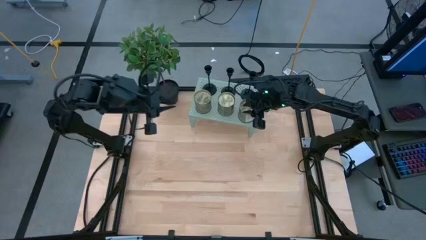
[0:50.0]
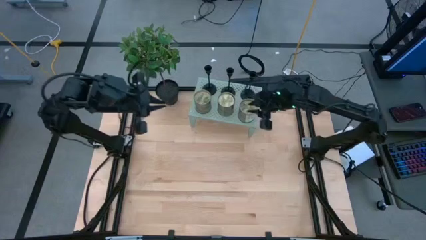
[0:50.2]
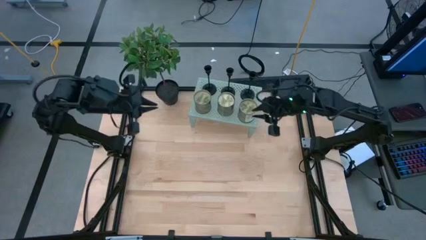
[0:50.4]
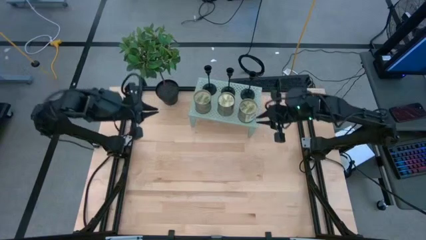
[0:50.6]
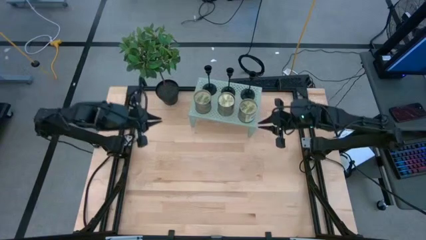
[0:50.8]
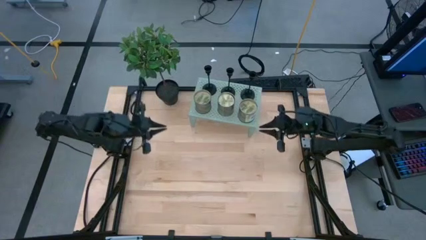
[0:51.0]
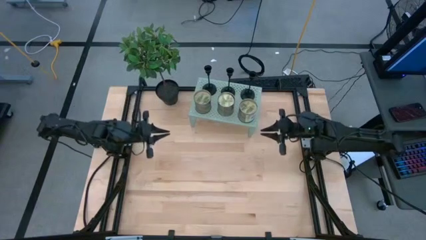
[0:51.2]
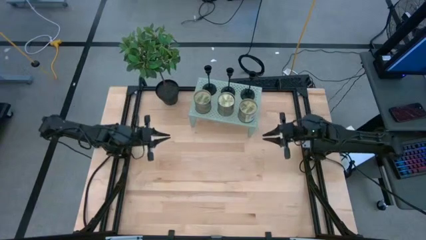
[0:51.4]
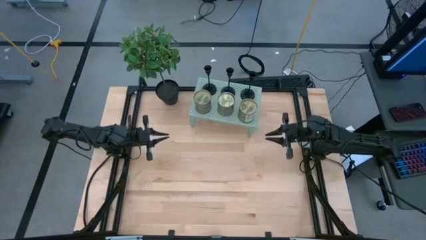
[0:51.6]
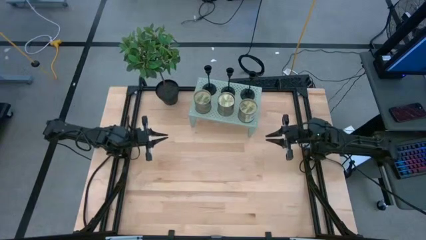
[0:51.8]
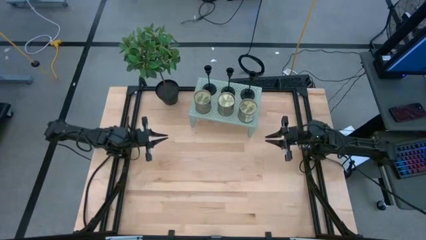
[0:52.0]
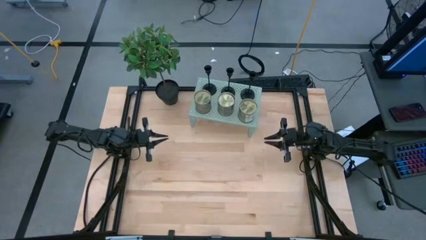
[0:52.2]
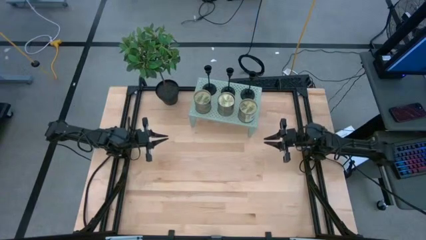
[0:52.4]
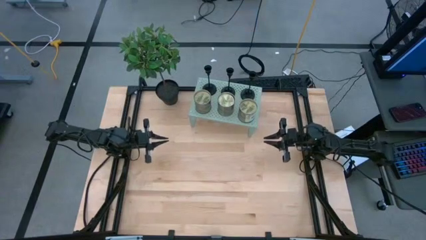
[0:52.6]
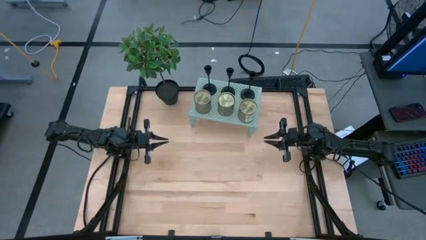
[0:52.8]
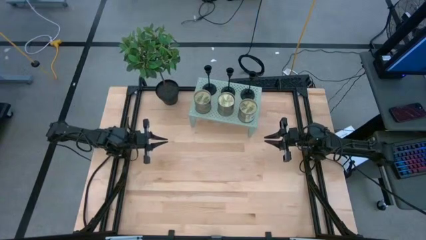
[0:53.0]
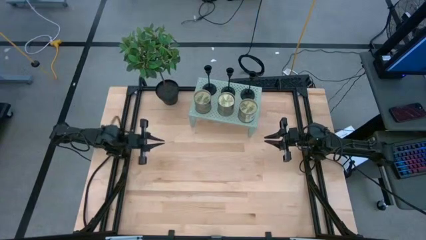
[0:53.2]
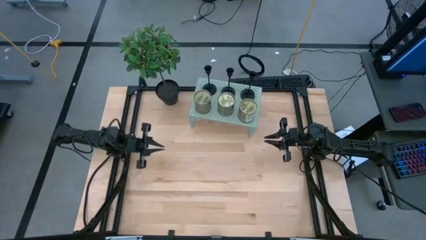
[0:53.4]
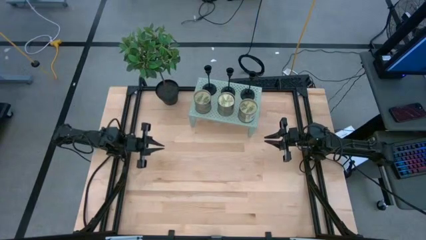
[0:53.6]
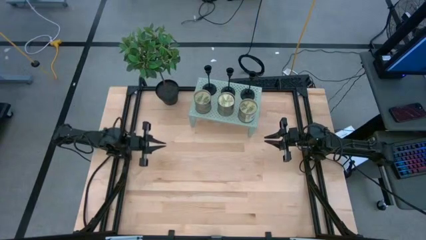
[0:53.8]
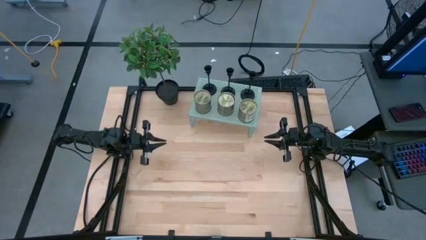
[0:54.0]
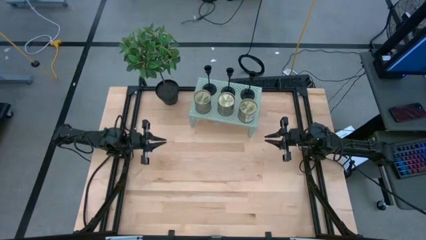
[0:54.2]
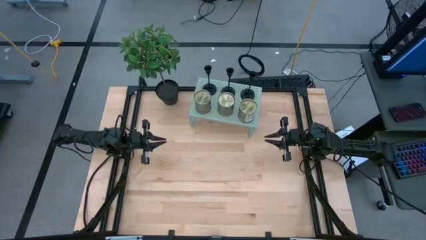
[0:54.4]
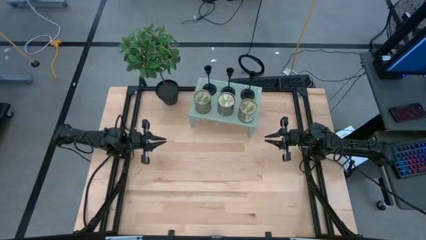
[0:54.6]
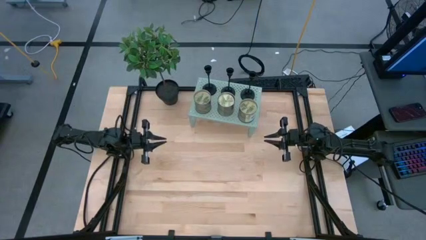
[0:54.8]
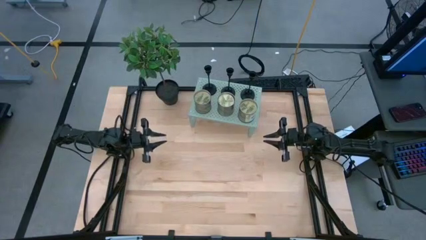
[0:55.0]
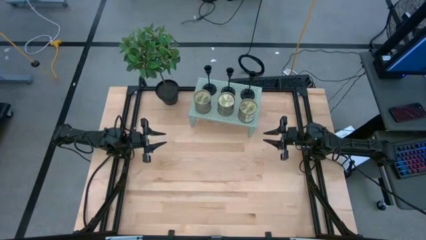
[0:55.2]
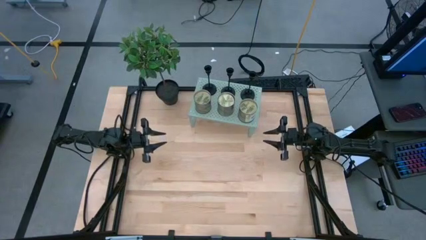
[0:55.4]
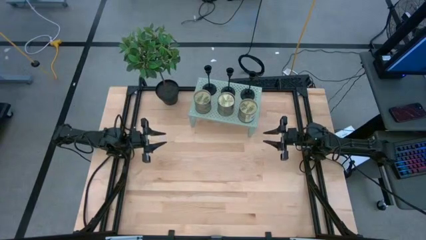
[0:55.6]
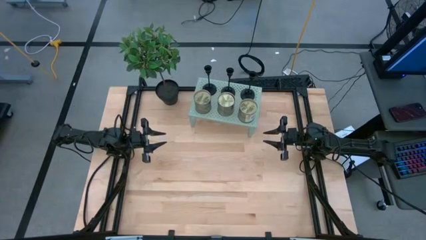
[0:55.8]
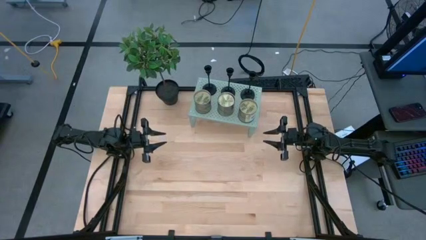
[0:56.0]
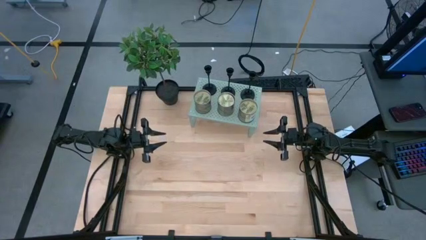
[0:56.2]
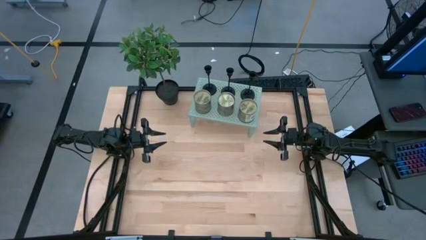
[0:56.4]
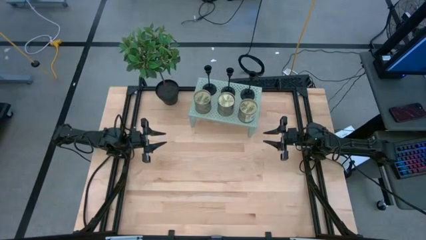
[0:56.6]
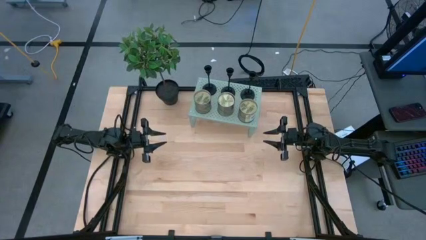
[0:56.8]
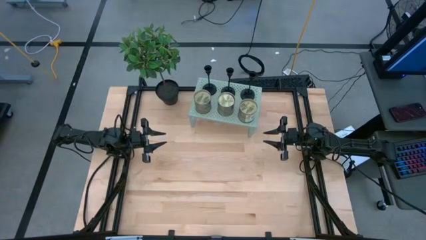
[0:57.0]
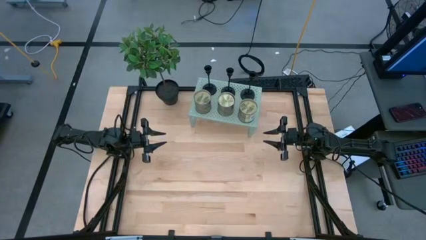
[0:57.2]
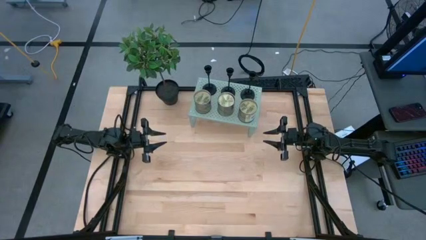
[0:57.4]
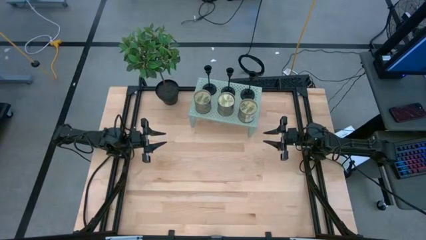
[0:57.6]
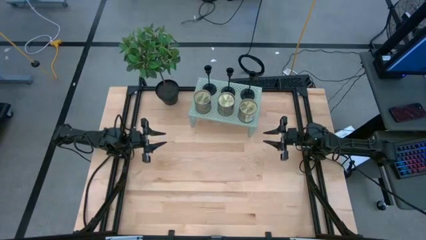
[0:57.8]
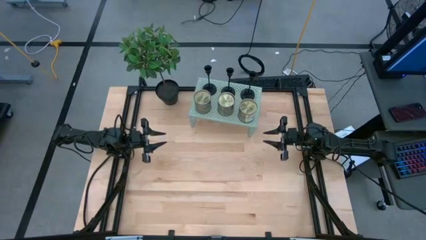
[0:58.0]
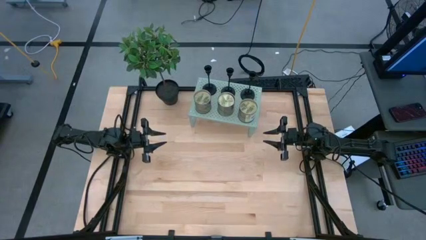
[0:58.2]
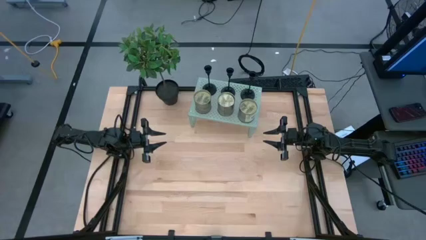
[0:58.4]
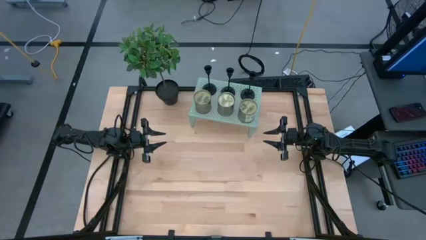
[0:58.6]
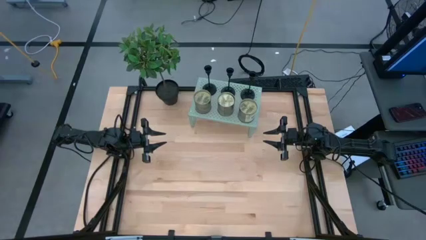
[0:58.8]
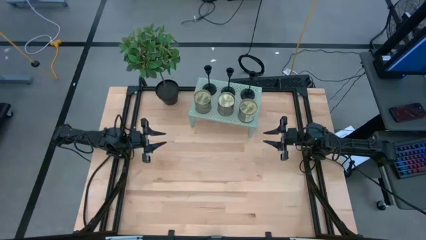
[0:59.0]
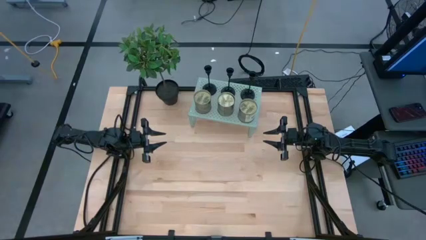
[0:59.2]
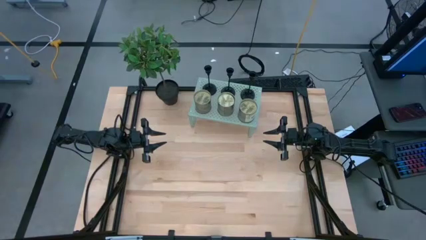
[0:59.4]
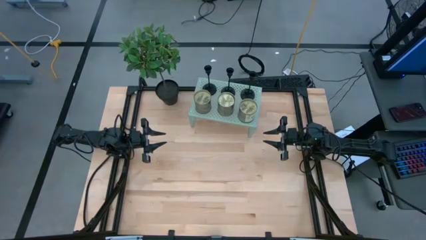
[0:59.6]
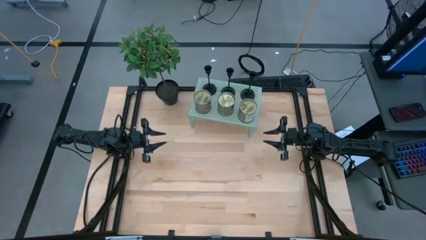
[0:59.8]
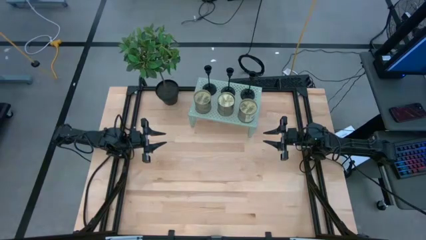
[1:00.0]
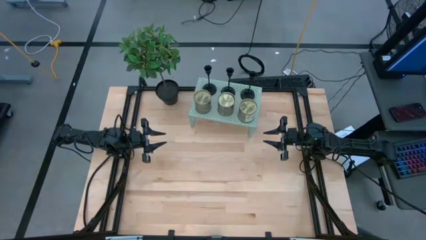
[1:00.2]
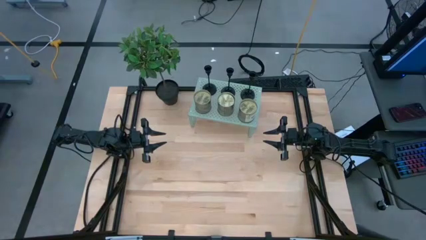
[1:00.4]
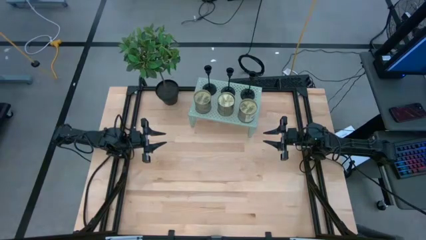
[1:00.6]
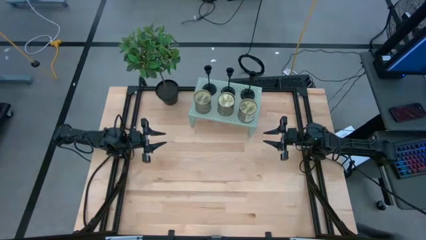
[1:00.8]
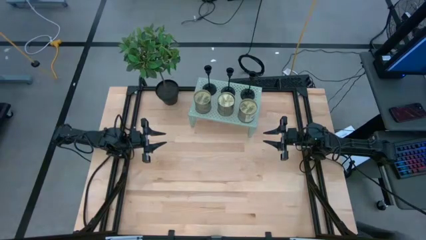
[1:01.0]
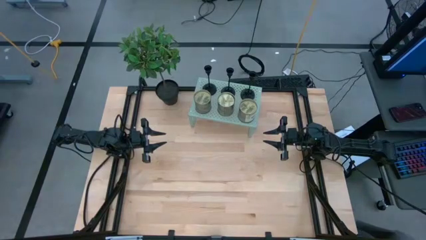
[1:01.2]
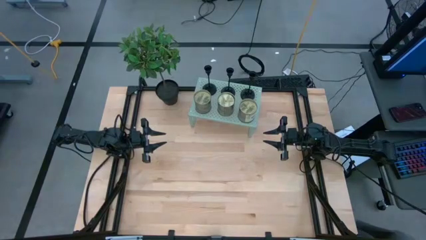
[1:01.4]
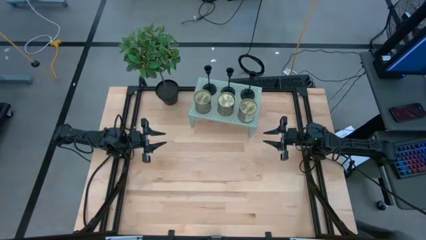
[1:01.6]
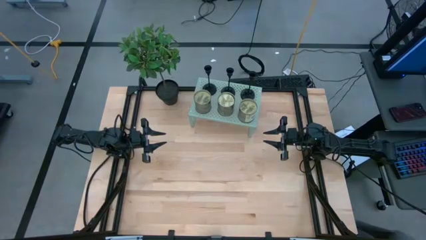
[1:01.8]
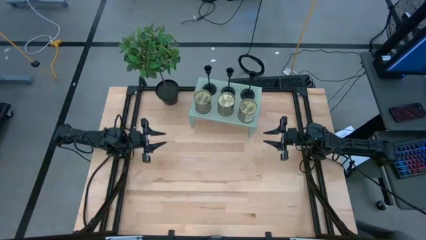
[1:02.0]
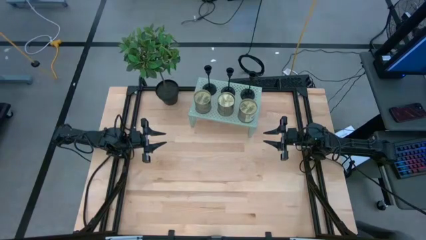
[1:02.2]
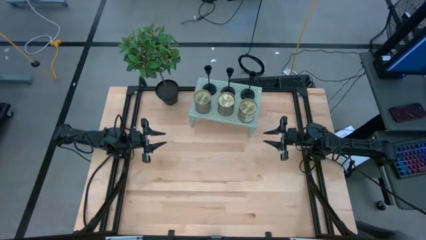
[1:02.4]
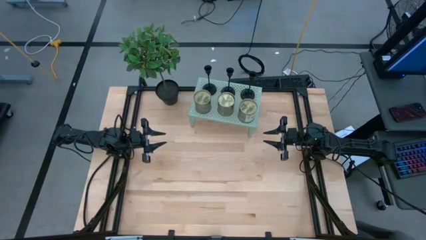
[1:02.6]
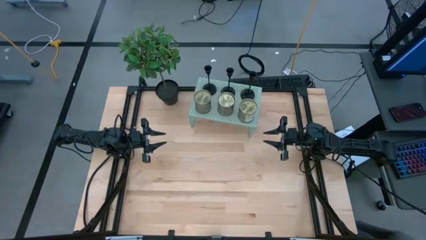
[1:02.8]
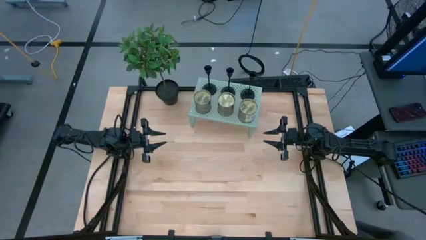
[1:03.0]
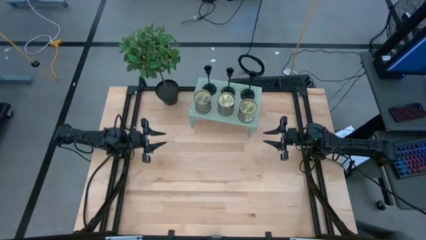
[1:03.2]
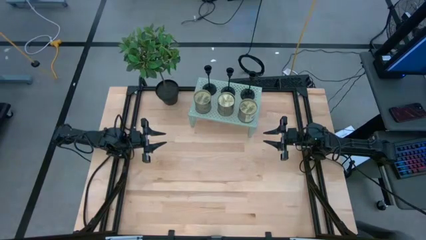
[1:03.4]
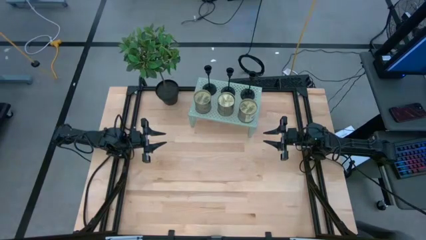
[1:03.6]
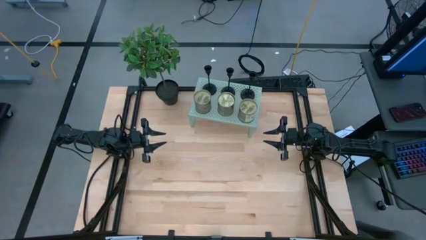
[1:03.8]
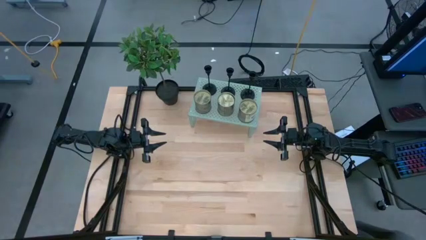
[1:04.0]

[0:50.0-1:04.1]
Task: Pick & Place candle stick holders
Return to Home Position
